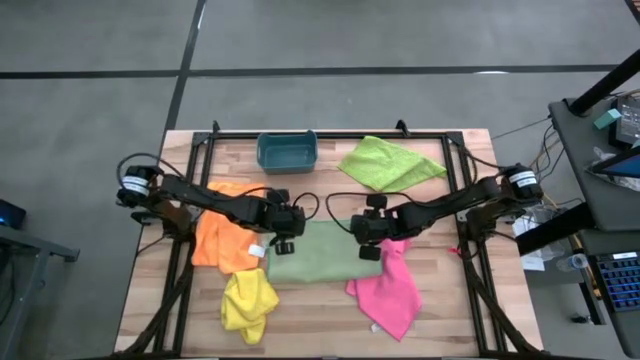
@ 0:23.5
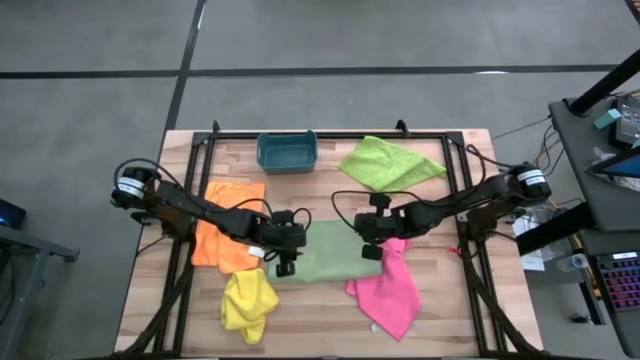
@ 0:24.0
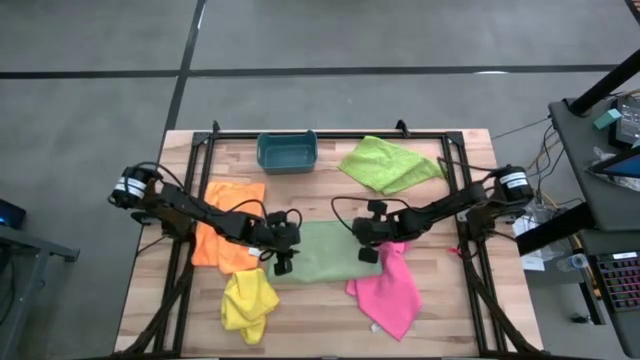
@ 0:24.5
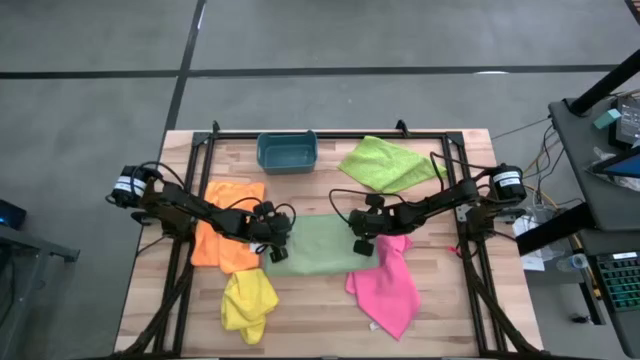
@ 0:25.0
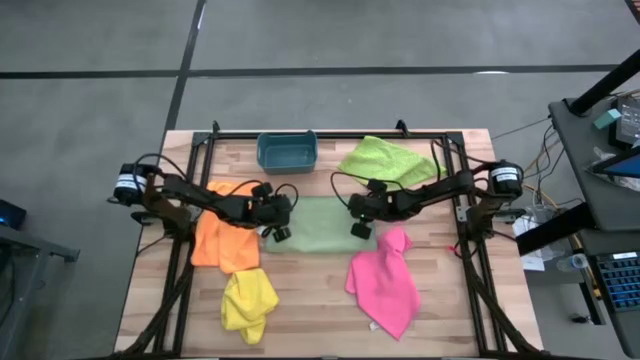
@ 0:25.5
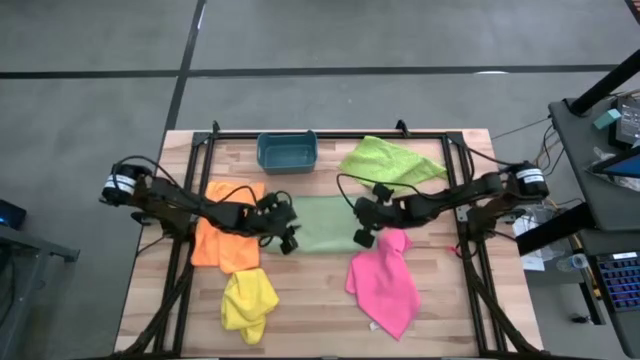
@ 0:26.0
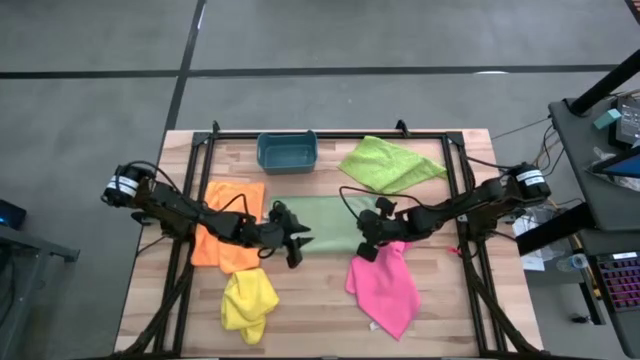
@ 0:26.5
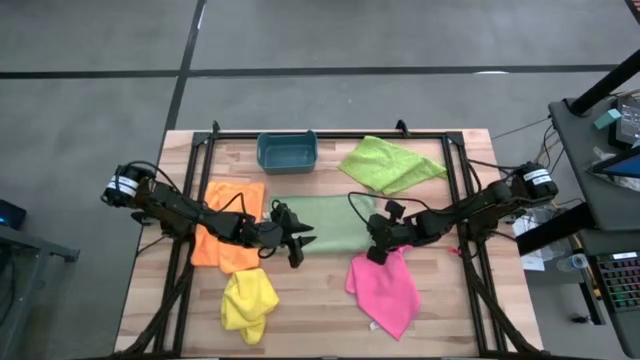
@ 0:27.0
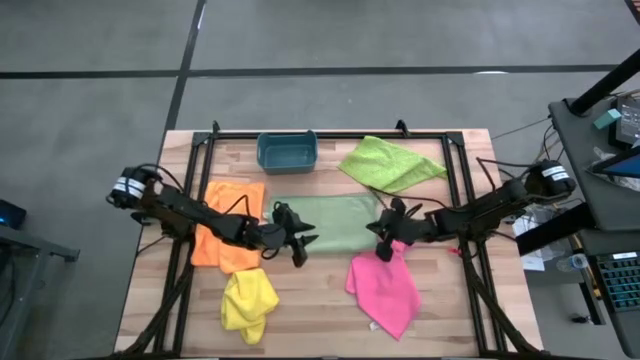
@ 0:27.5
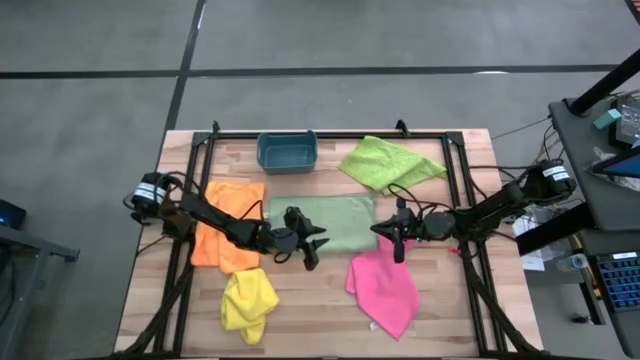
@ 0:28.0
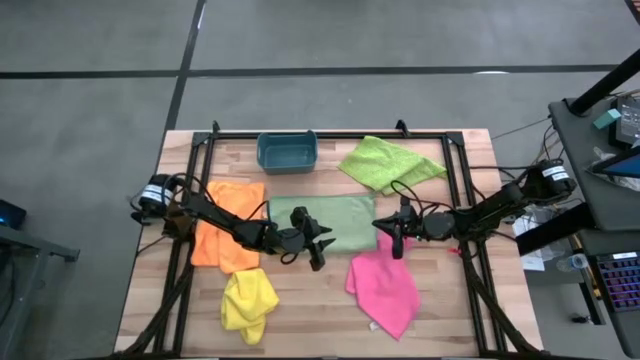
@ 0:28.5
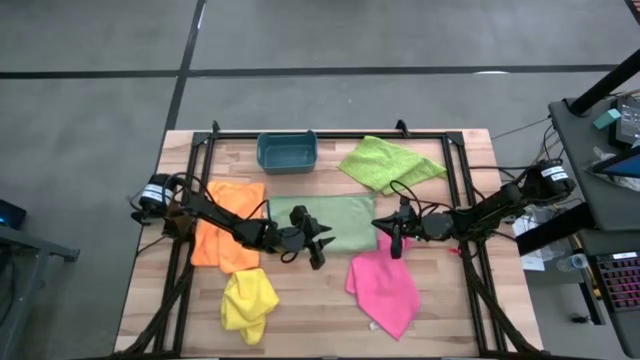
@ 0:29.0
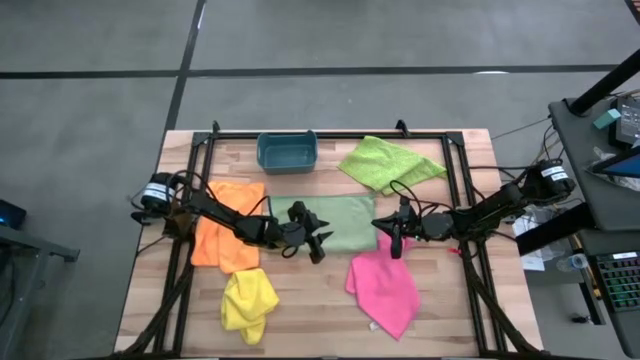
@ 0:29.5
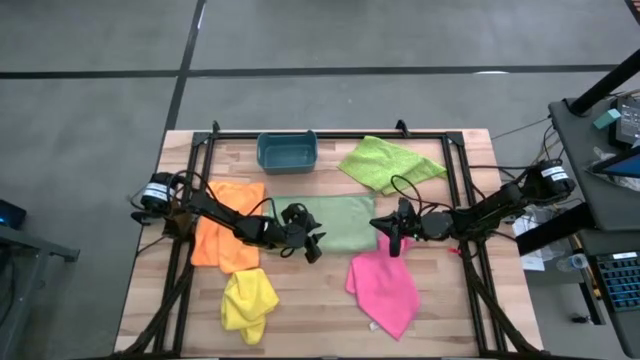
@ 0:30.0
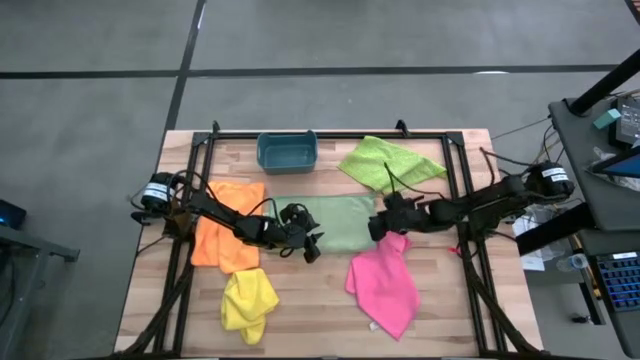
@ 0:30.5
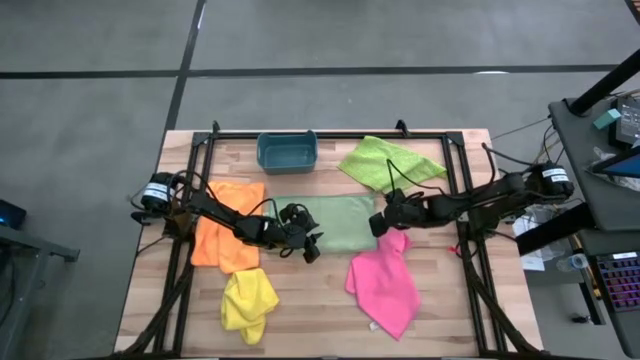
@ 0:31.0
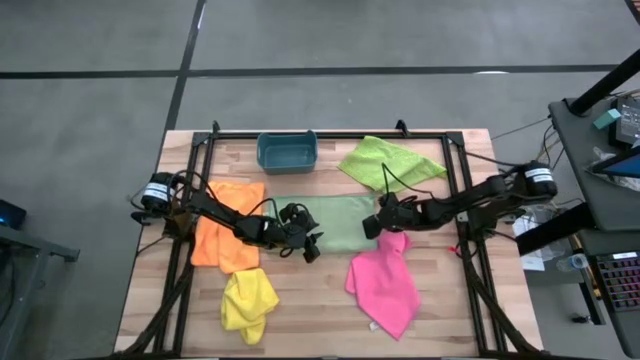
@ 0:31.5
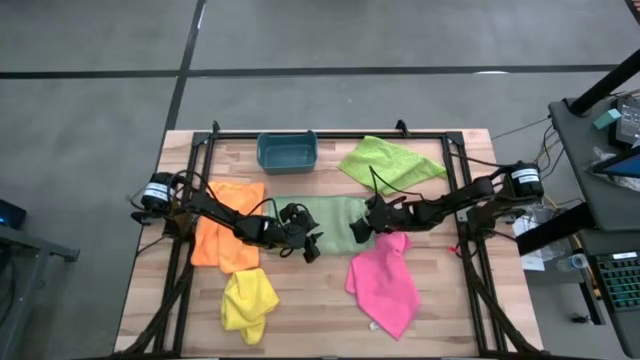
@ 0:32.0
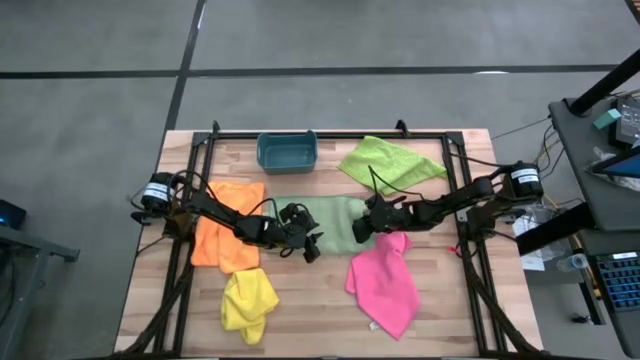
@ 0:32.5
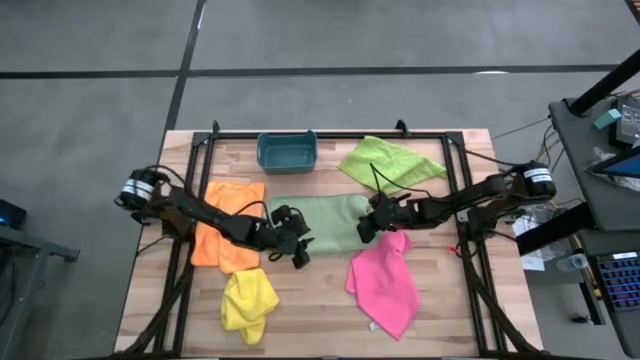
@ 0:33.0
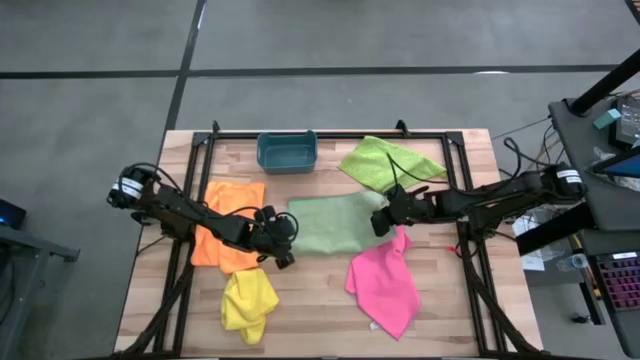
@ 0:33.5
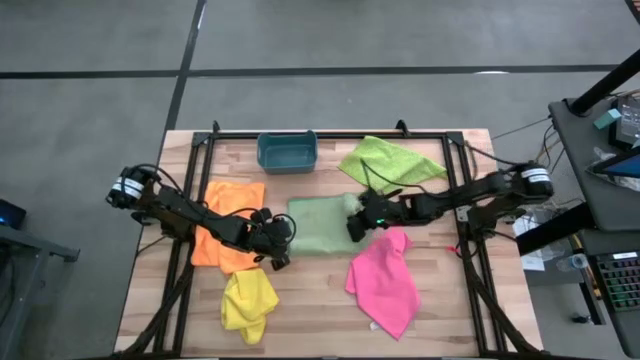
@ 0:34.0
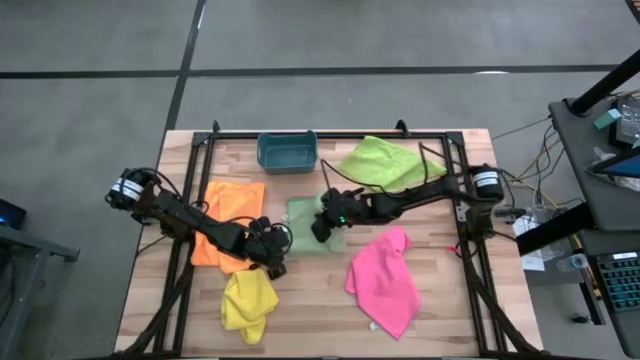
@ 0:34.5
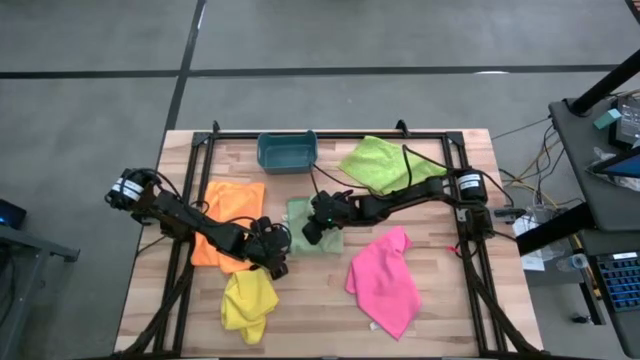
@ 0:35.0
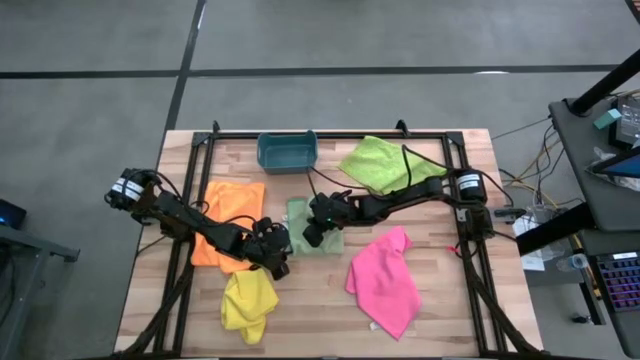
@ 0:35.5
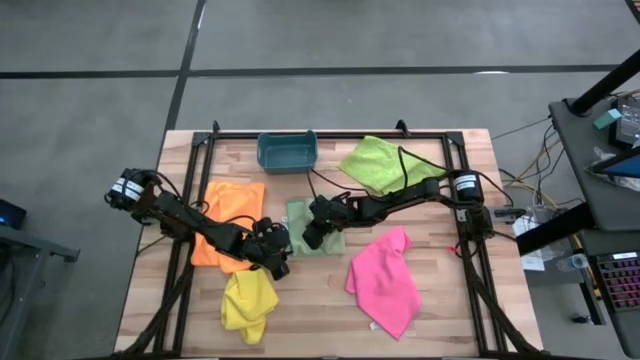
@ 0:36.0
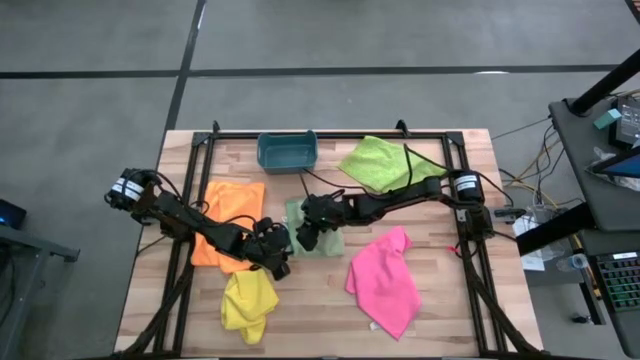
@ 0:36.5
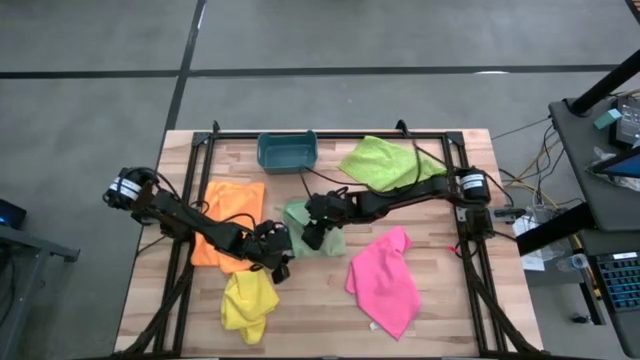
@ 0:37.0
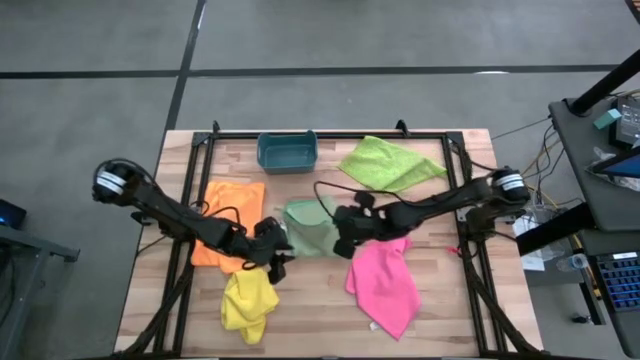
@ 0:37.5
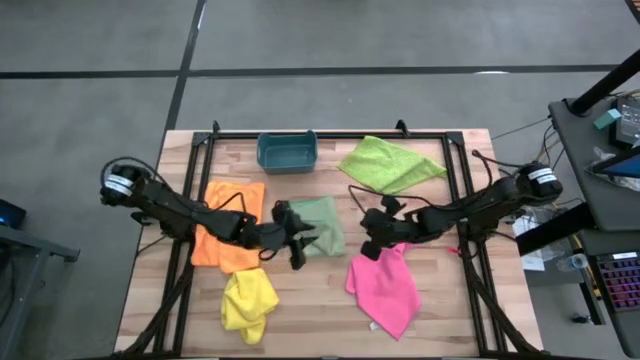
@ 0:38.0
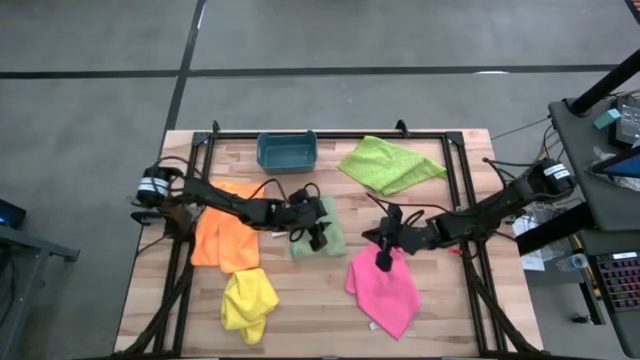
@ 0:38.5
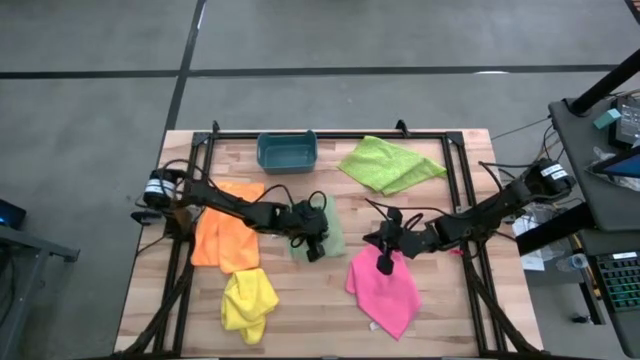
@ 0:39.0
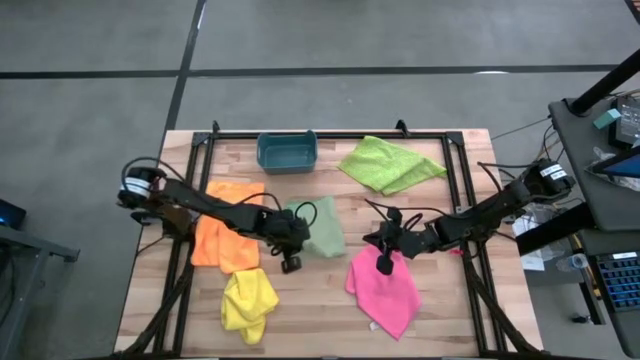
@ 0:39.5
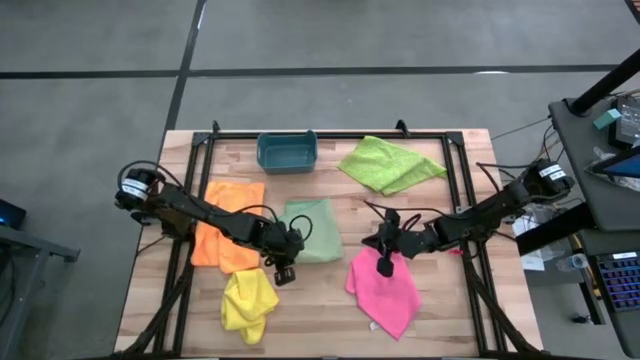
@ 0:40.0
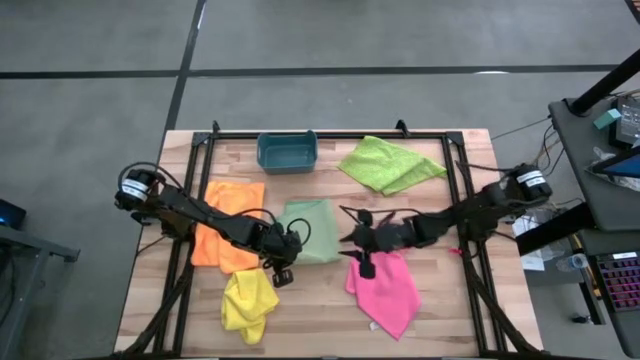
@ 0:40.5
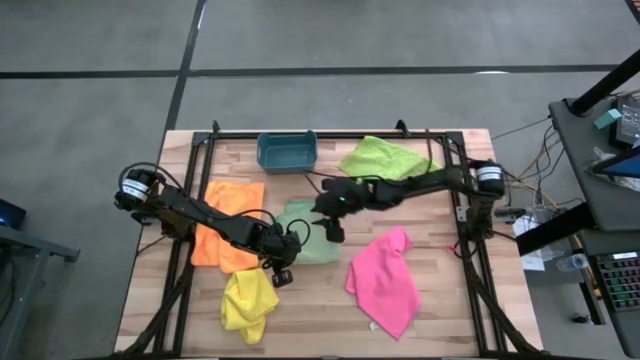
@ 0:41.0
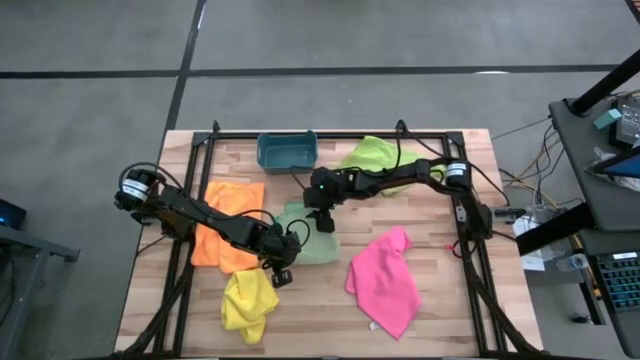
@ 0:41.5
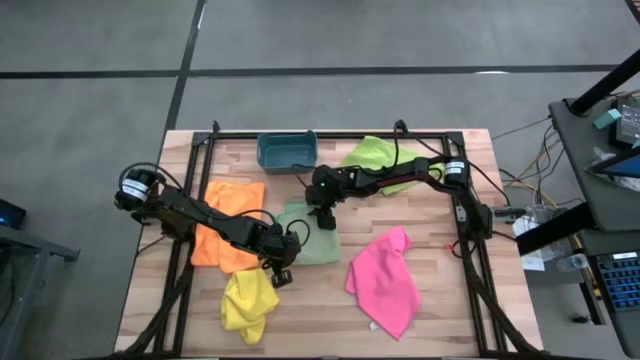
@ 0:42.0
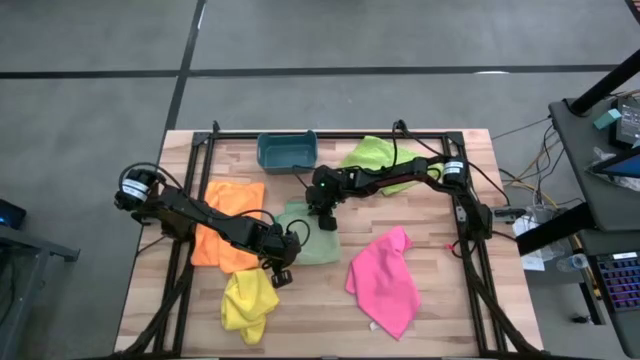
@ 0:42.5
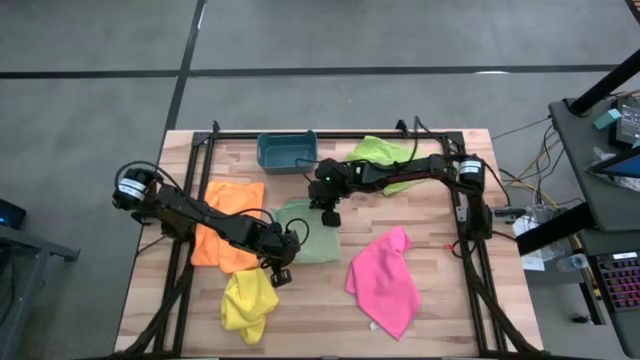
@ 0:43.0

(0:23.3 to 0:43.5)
Task: Fold microfiber towels
Fold the blue towel
